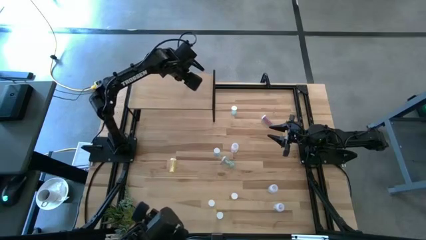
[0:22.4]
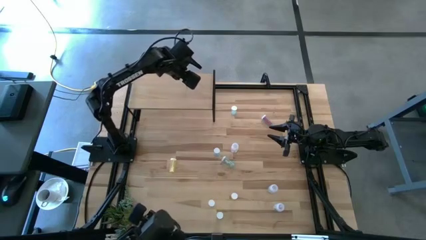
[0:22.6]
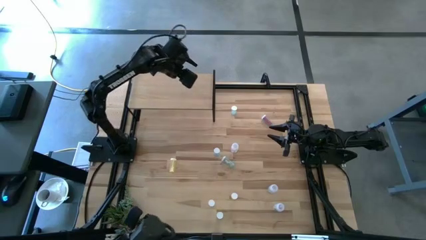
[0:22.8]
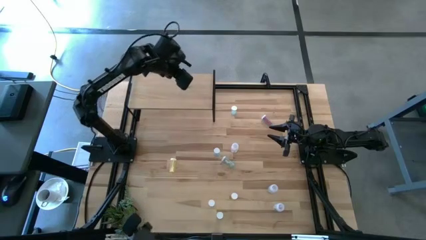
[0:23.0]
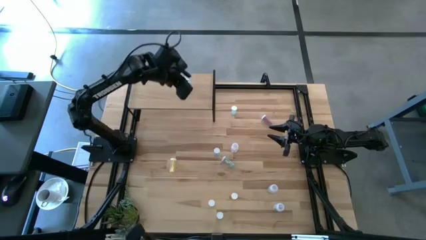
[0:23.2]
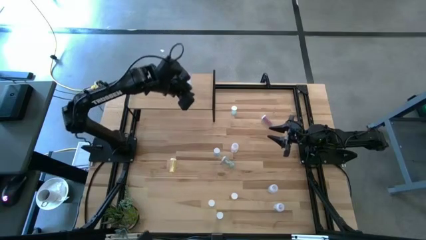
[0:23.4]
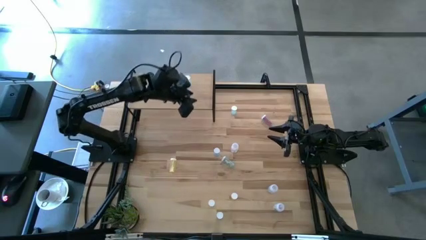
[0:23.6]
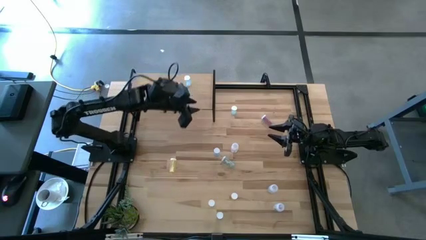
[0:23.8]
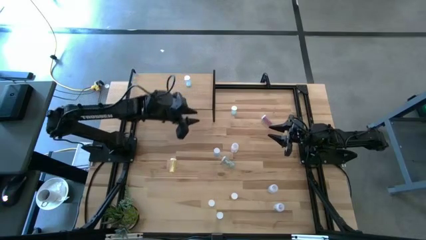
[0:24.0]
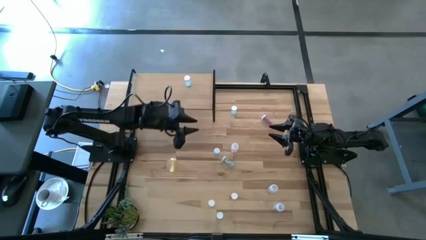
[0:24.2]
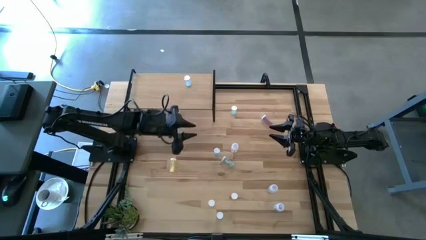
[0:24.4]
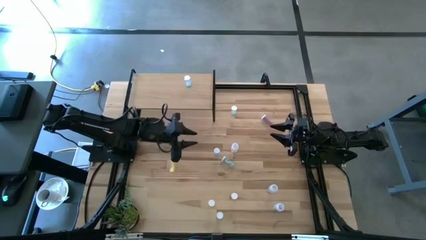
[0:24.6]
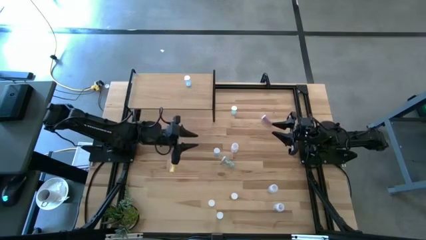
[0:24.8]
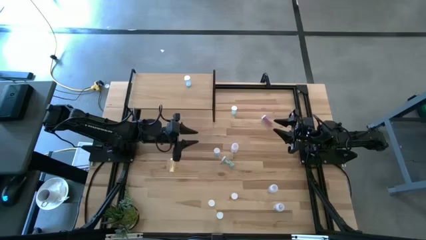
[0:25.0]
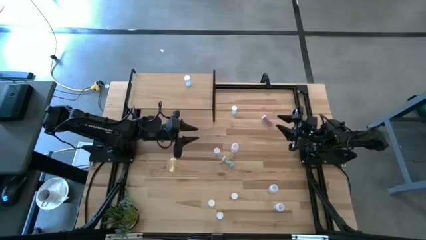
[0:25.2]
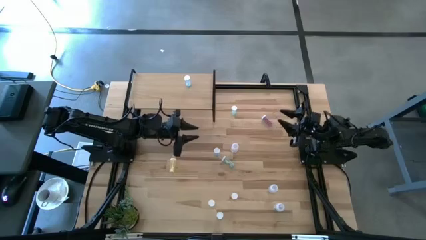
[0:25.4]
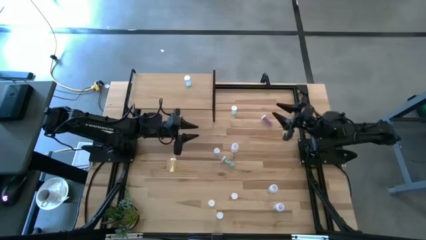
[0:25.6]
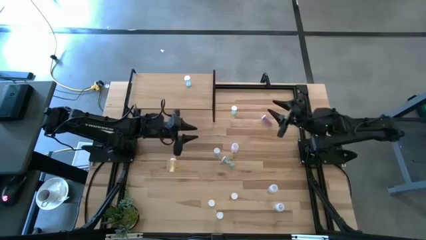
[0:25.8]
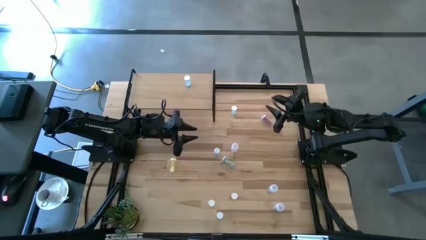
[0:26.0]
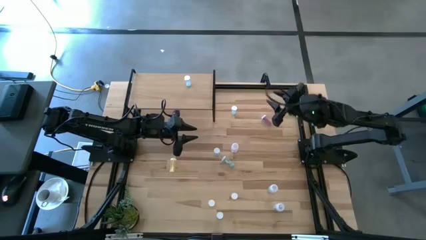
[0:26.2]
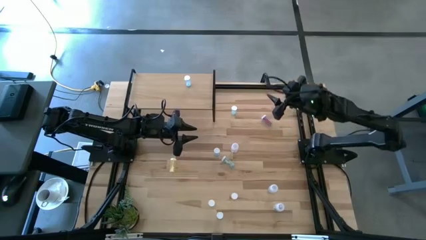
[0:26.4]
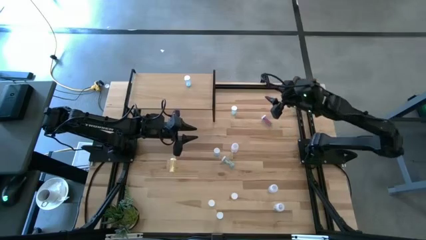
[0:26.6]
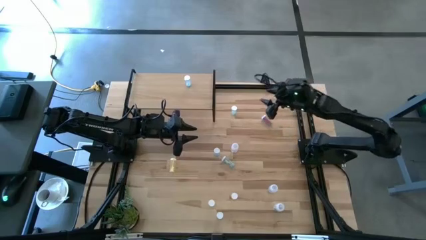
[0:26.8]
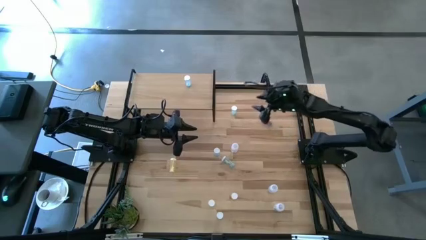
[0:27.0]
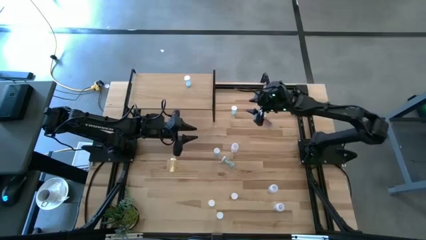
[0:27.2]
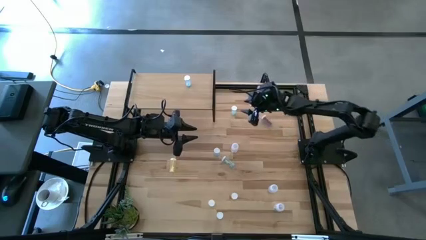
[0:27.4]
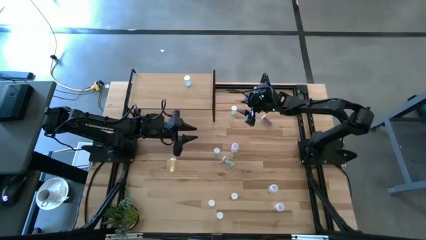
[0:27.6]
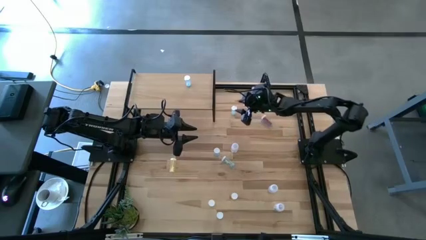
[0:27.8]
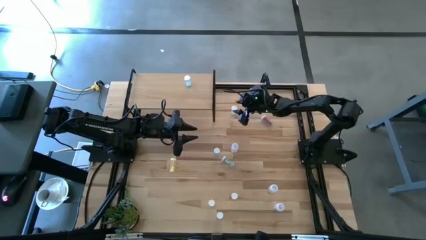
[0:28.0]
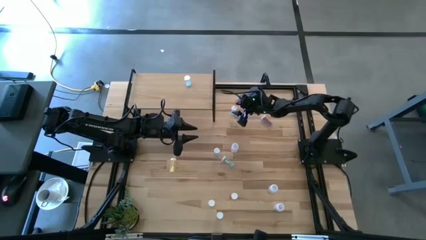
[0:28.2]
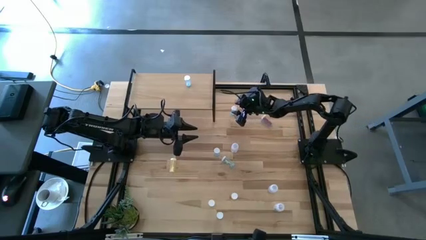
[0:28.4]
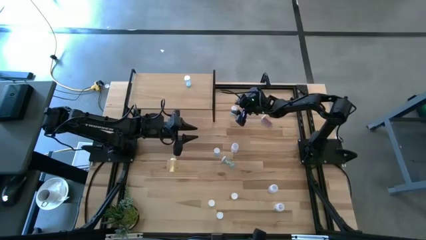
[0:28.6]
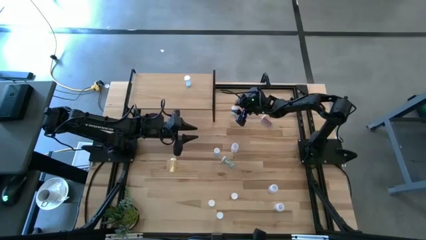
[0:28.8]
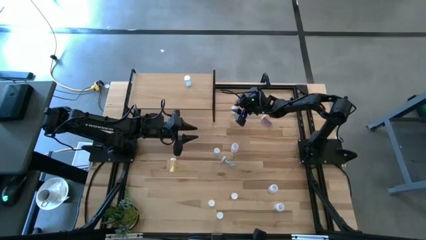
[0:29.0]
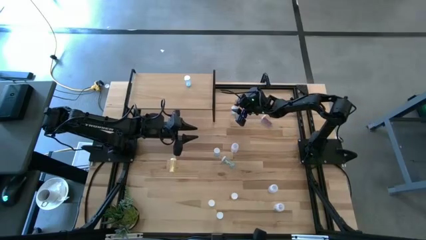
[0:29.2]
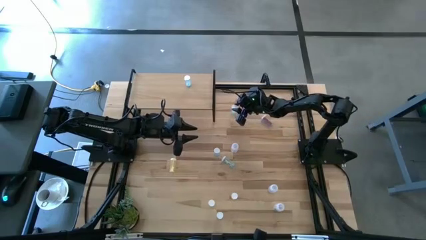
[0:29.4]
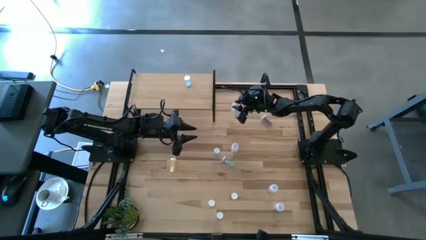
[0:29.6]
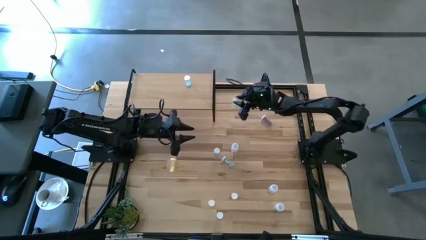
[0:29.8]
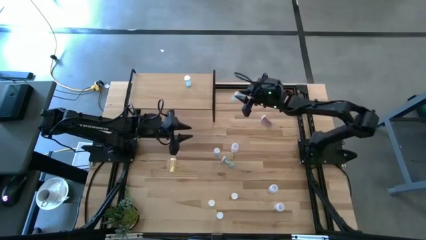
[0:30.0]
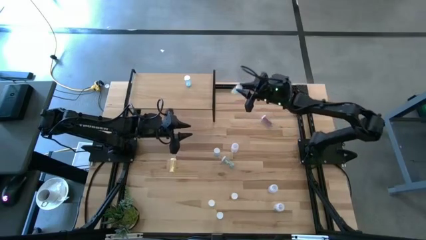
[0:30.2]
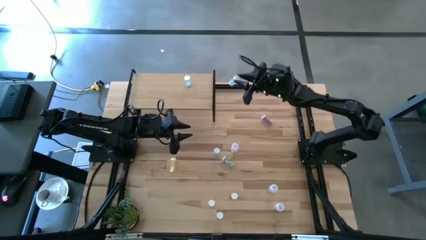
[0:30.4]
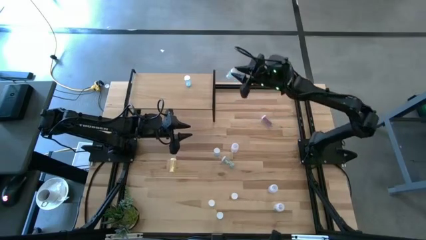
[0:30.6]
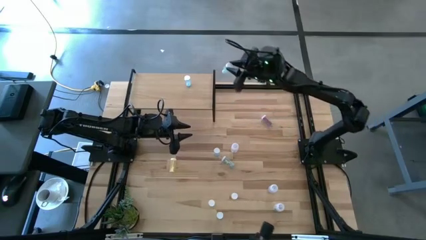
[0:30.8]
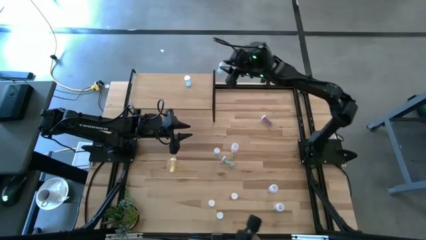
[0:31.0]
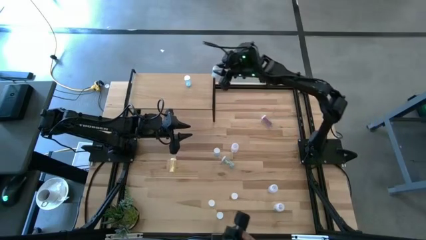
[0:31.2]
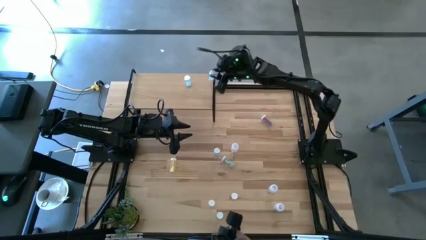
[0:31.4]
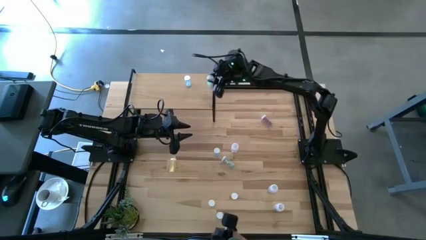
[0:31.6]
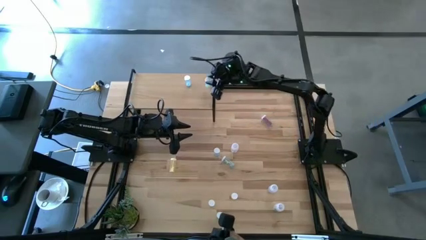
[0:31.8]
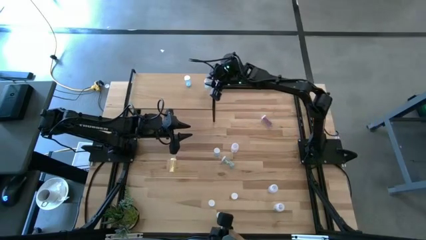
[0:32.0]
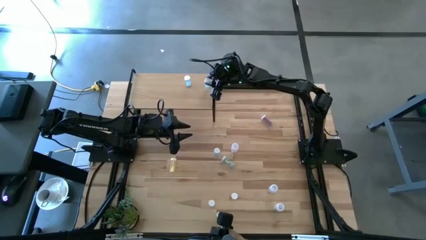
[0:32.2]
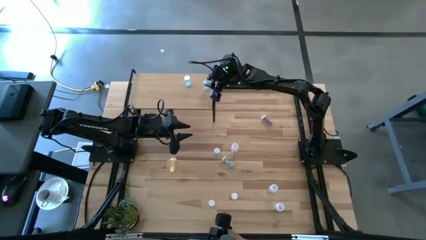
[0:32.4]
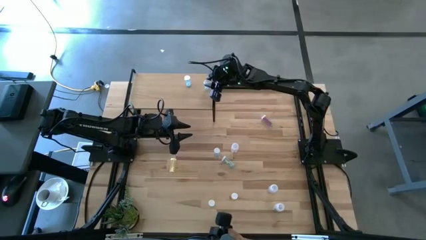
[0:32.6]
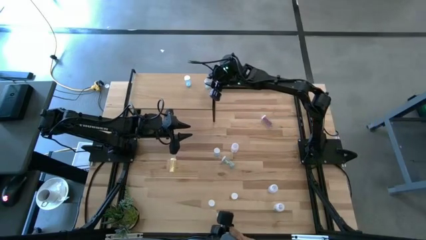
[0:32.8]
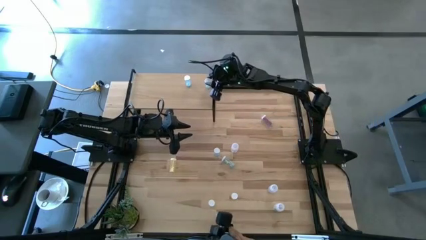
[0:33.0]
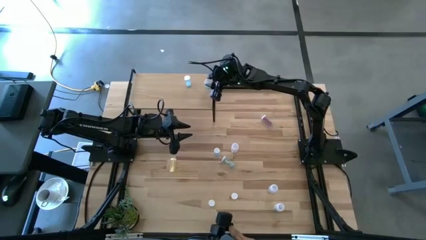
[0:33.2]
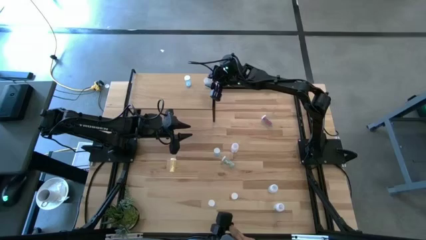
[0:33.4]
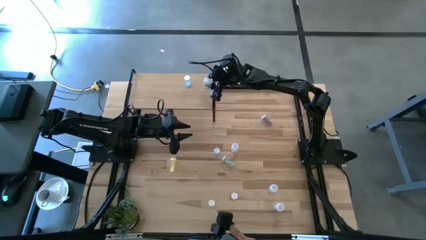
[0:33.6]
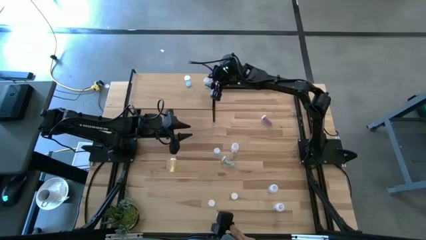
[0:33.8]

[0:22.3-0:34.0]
Task: Pick and place medicine bottles onto shelf by color
Put the top green pill bottle on the shelf
